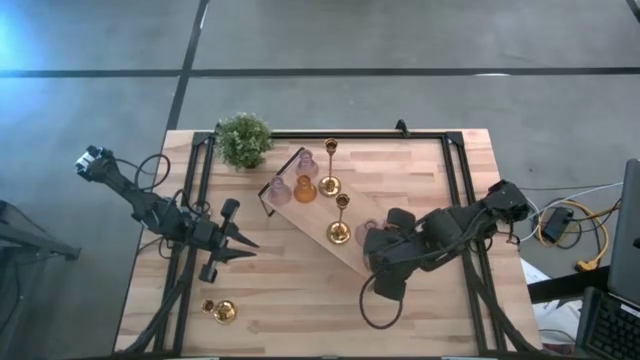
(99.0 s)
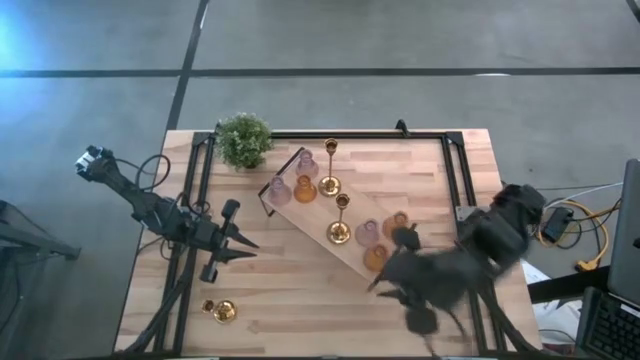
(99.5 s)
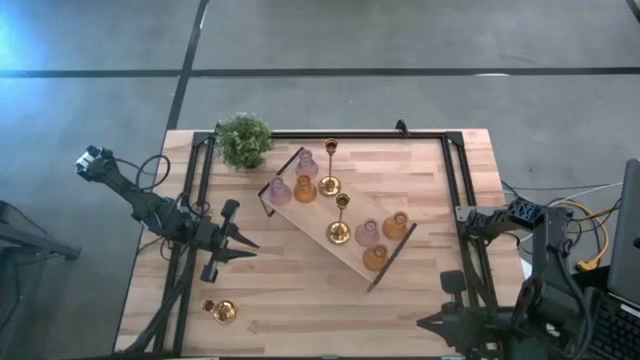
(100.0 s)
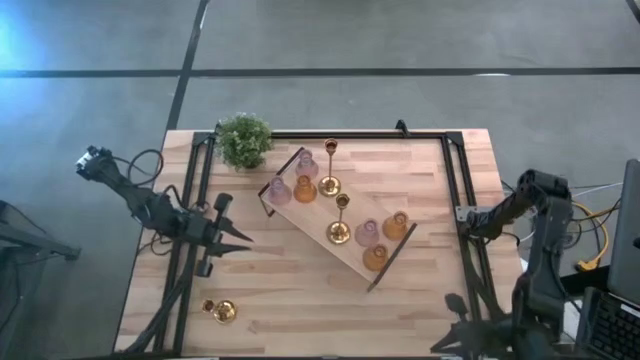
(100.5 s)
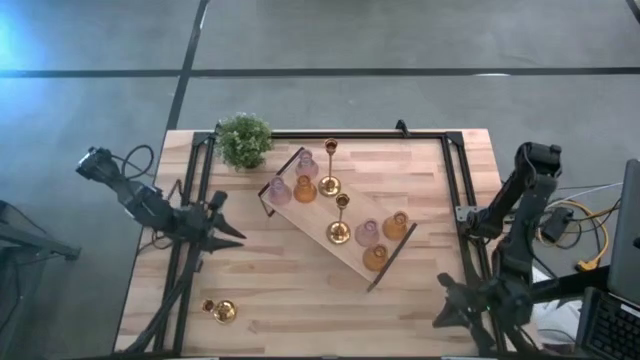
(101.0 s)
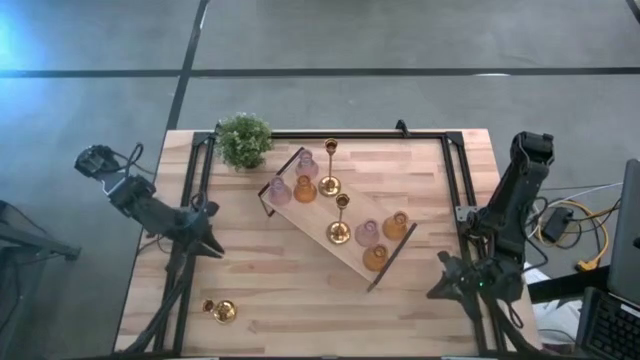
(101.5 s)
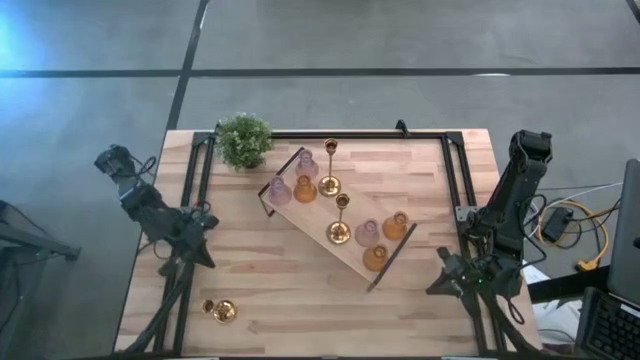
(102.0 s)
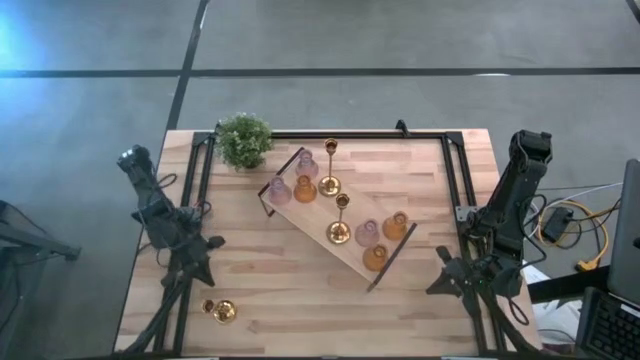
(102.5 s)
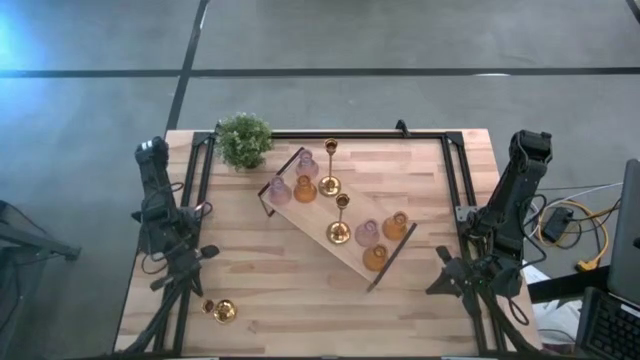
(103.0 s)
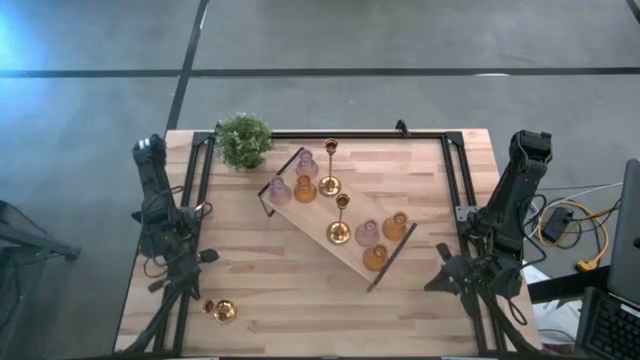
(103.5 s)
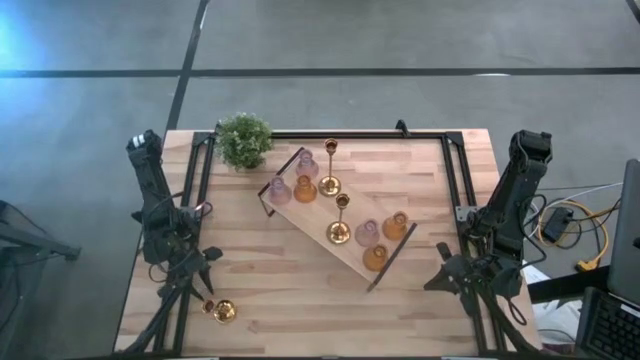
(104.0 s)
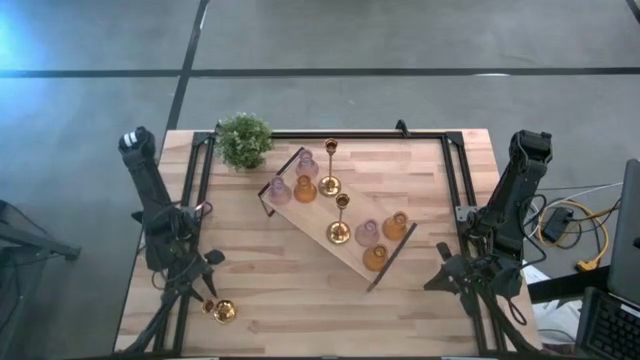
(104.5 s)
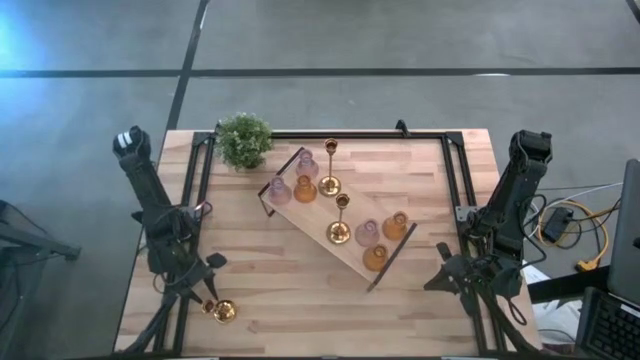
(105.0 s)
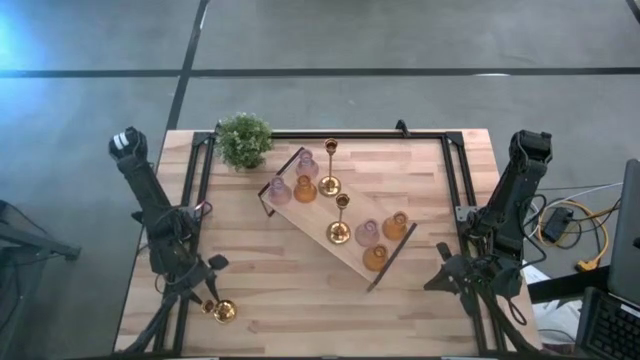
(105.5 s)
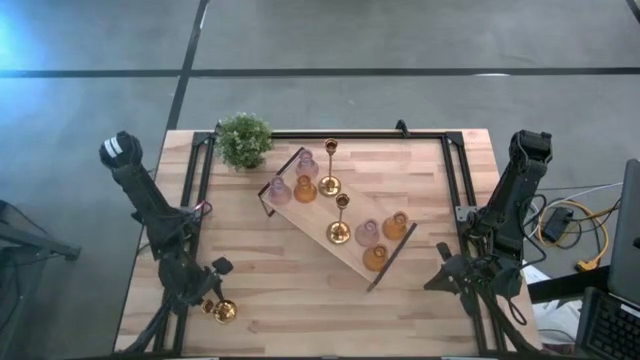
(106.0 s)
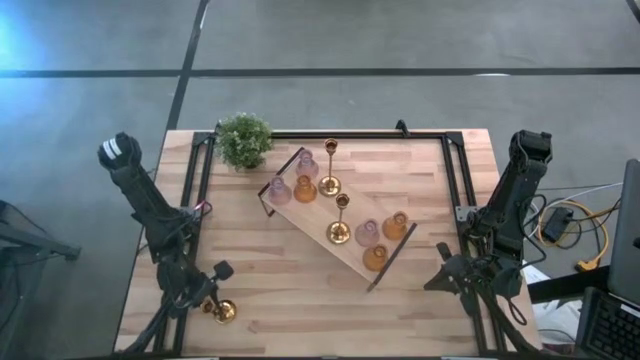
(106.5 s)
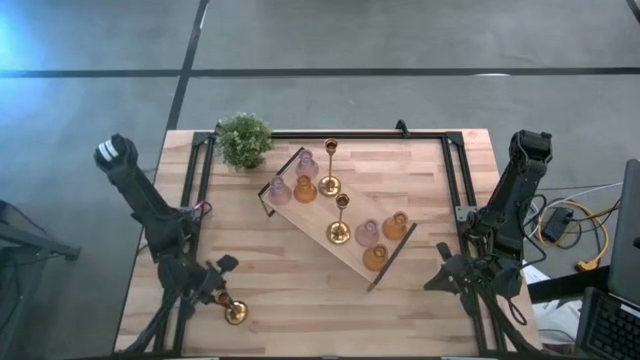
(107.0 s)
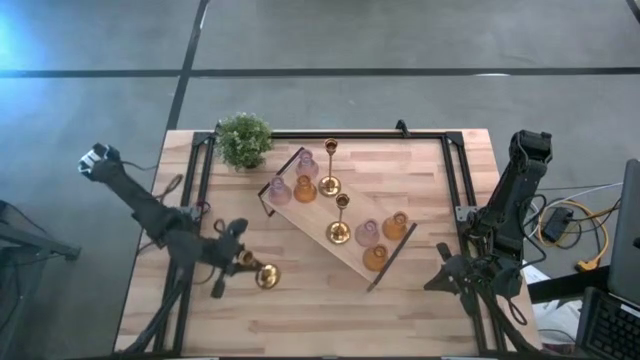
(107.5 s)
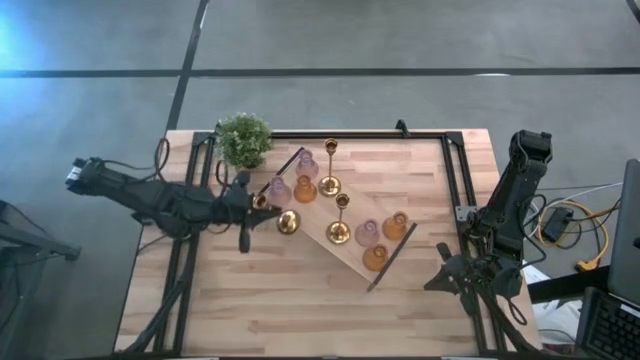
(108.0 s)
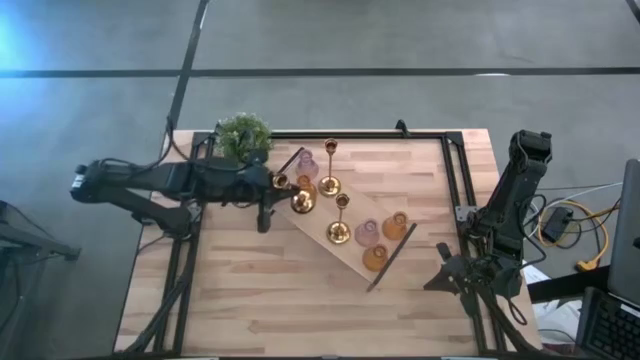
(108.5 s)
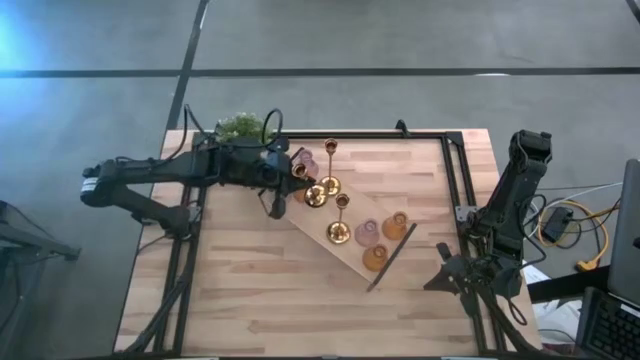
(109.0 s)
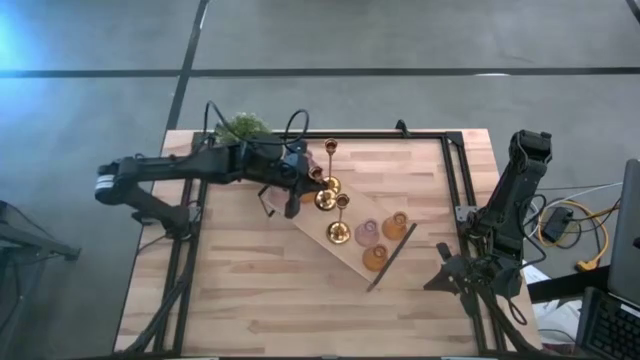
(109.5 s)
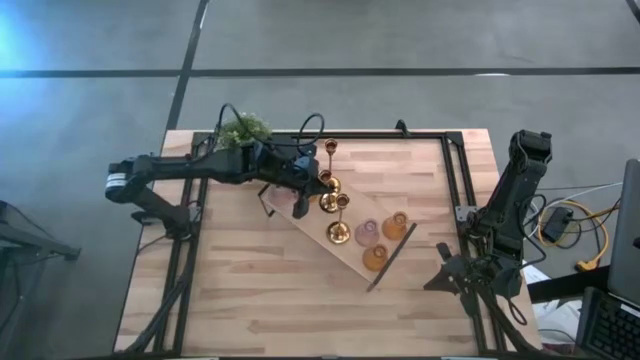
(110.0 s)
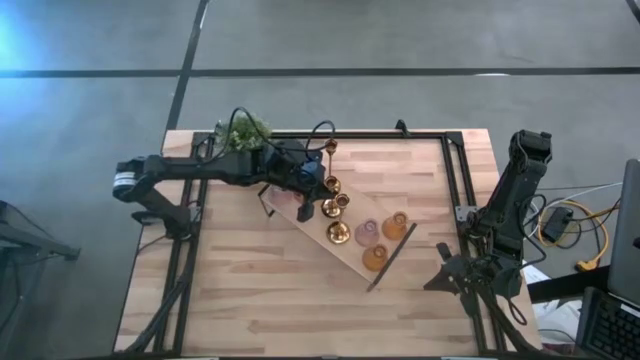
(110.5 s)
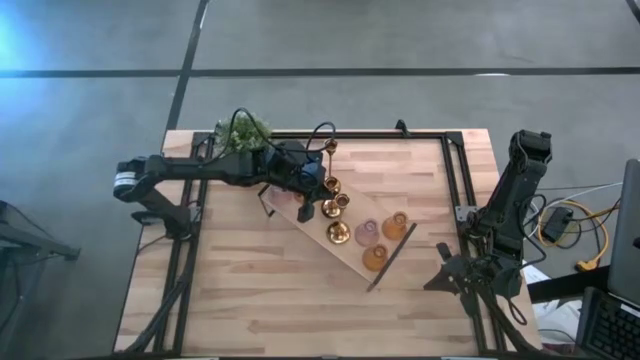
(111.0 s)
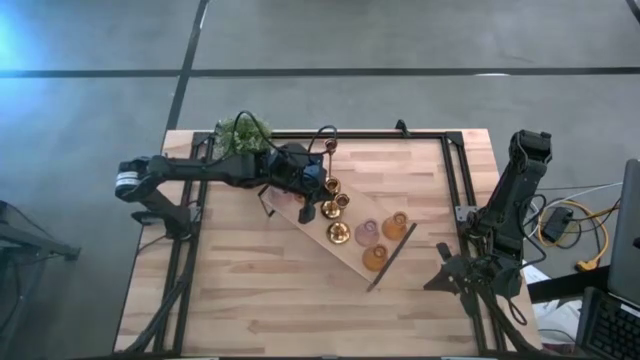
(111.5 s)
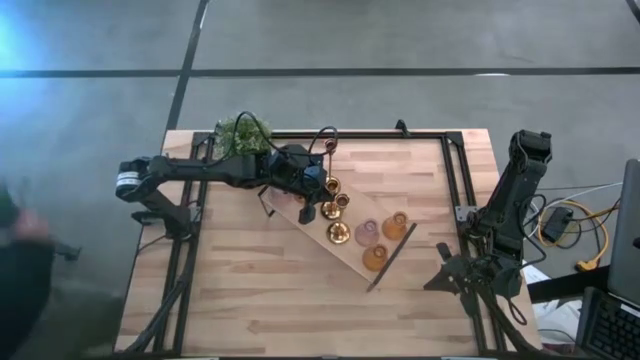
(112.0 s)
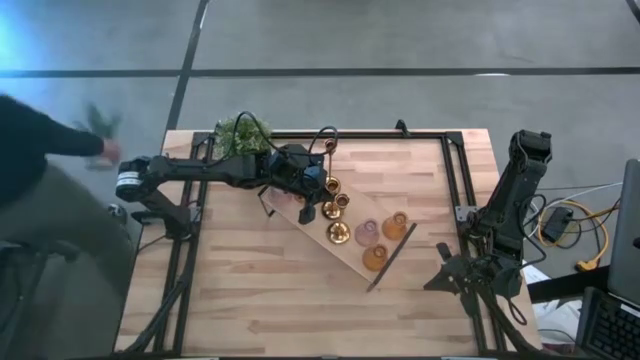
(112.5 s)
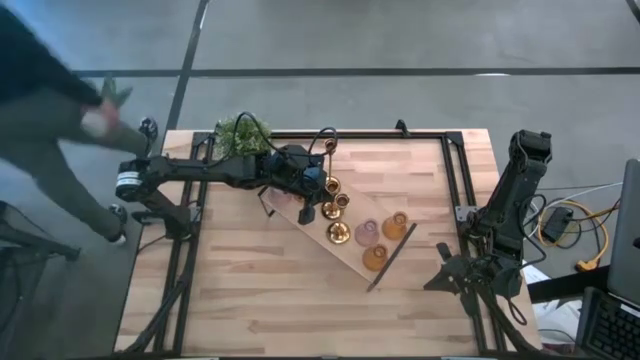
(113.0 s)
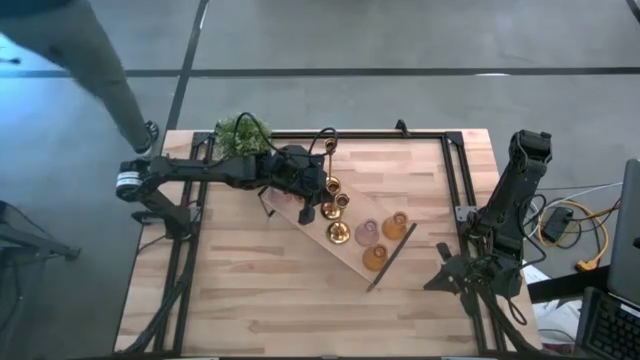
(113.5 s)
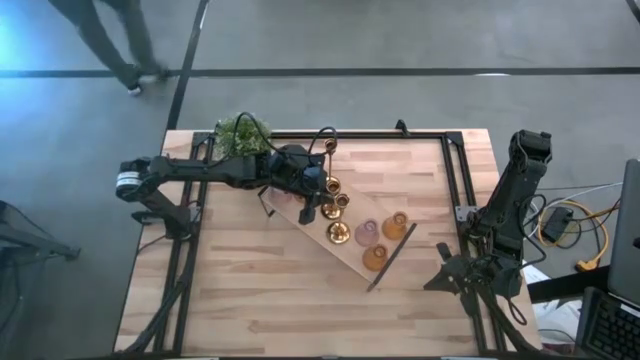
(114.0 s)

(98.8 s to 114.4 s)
Task: Pick & Place candle stick holders
Put the gold candle holder on the shelf

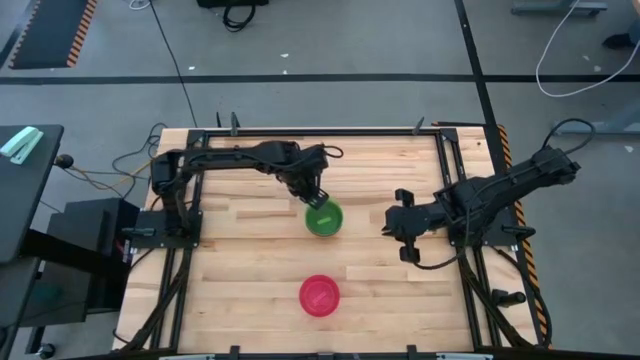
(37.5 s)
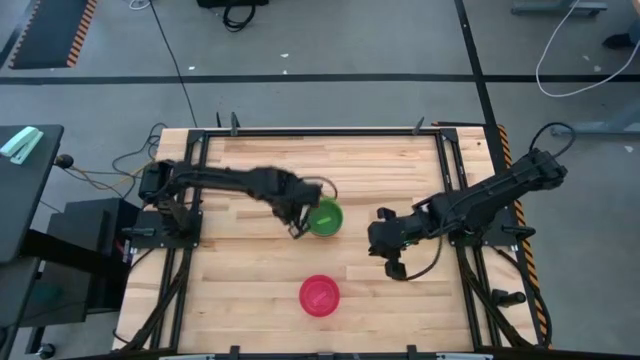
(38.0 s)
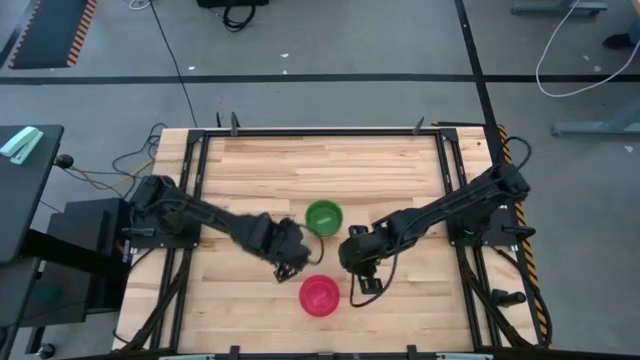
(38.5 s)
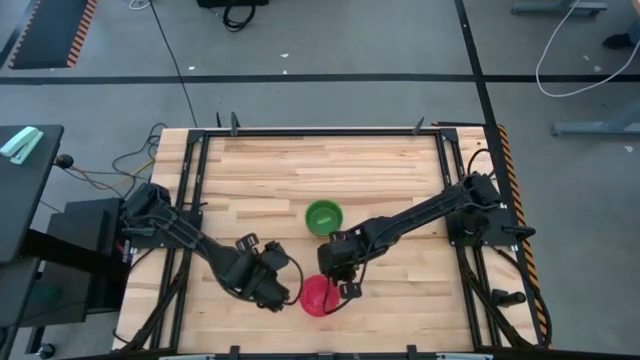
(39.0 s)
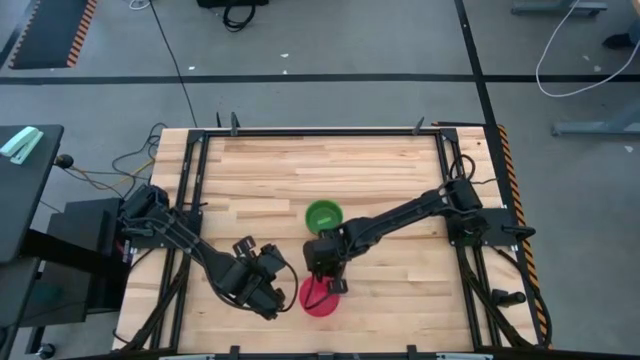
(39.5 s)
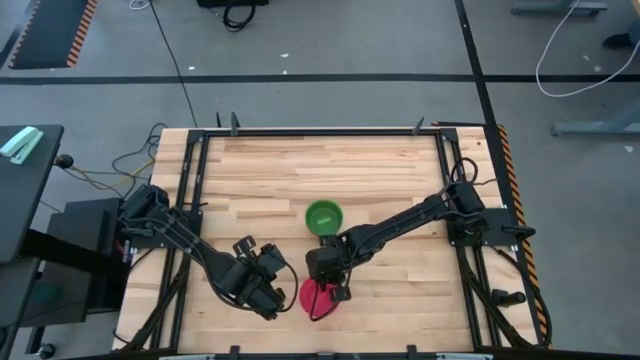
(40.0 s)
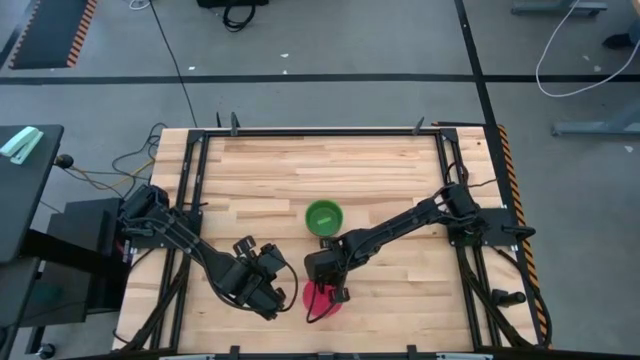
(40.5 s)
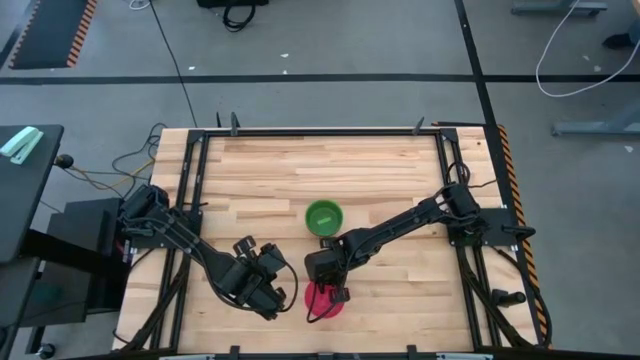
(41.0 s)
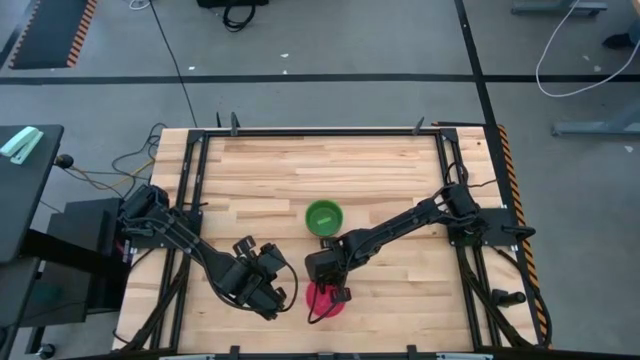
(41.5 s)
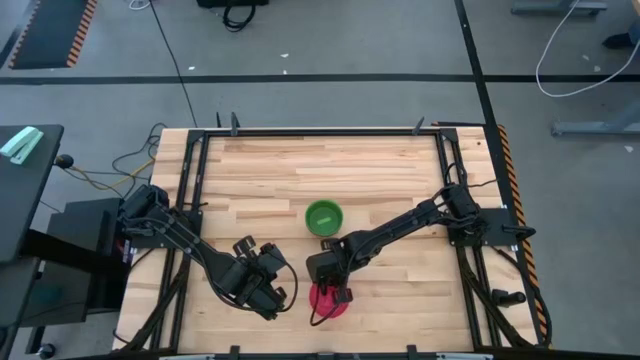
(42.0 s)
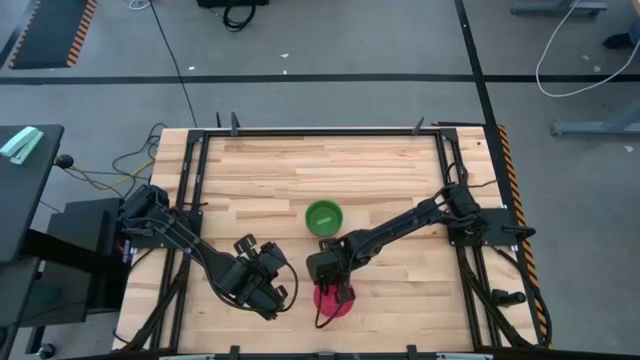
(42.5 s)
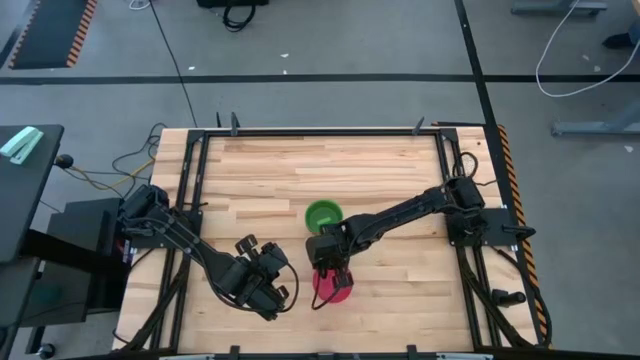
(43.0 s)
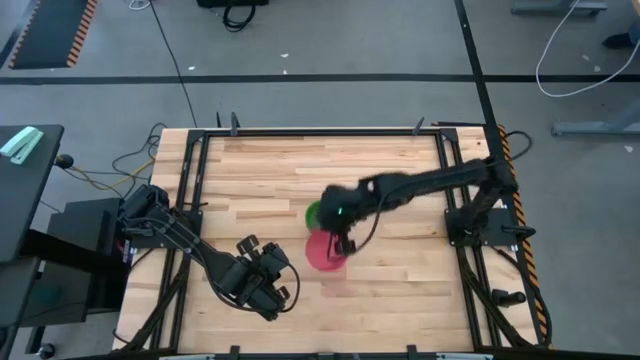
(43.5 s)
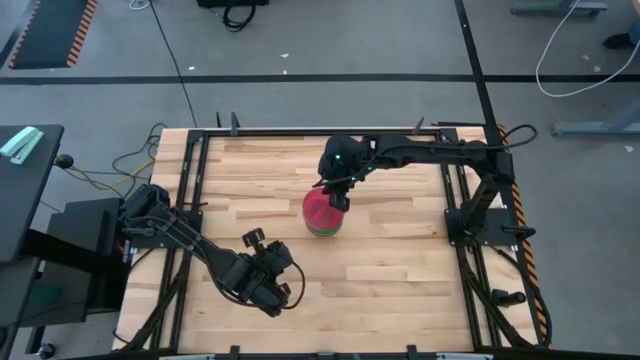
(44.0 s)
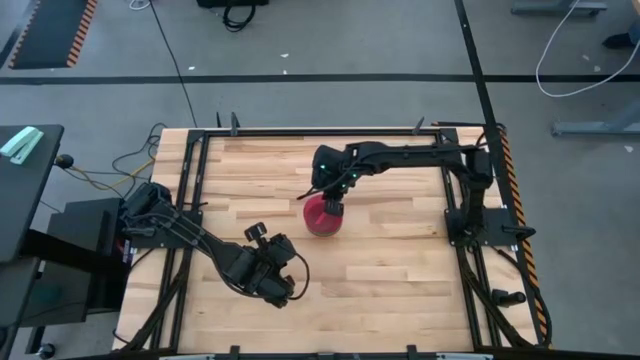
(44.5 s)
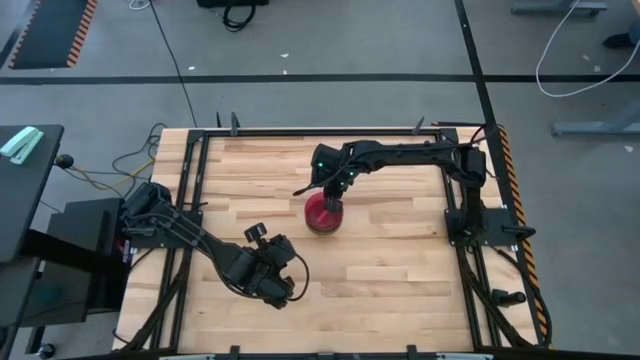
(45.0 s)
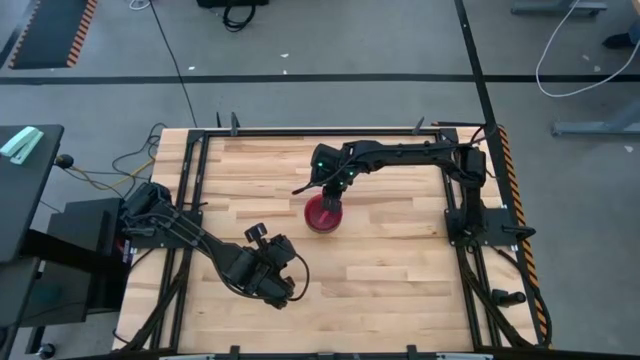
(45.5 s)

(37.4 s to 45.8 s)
Task: Nest bowls inside each other
Stack the pink bowl onto the green bowl
